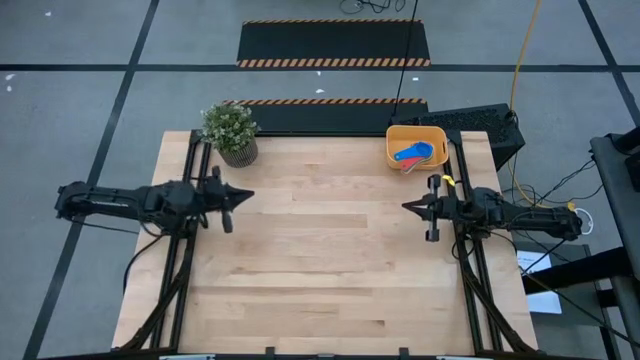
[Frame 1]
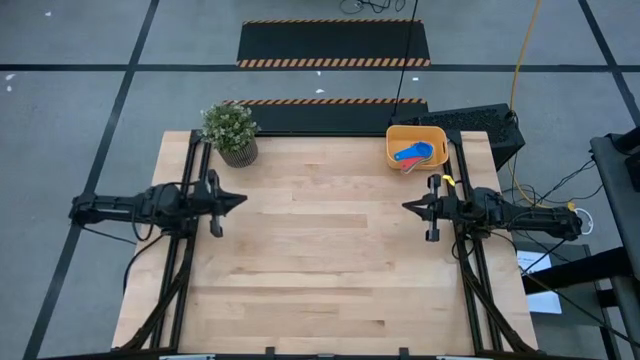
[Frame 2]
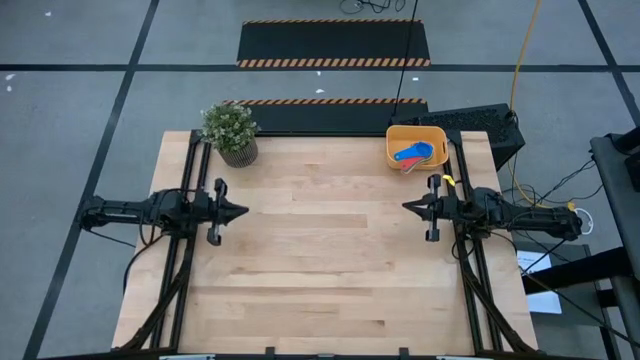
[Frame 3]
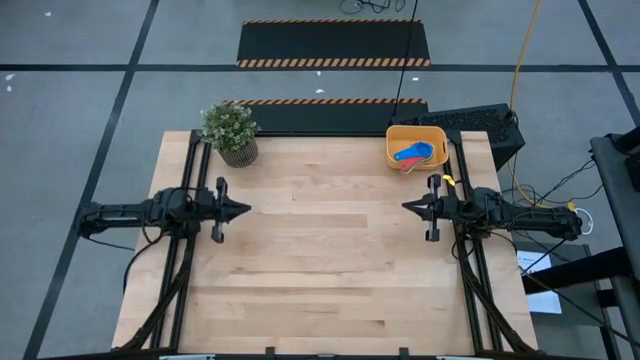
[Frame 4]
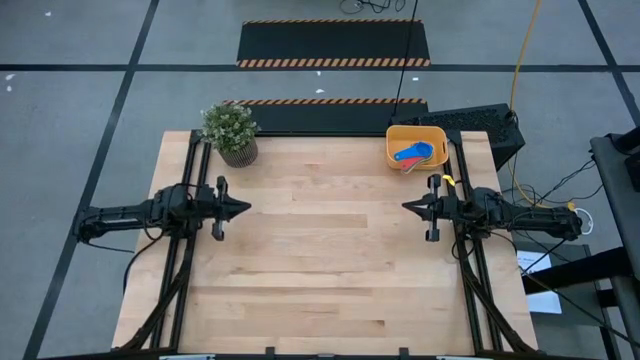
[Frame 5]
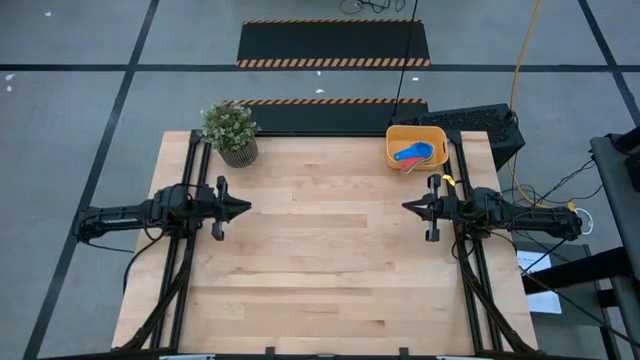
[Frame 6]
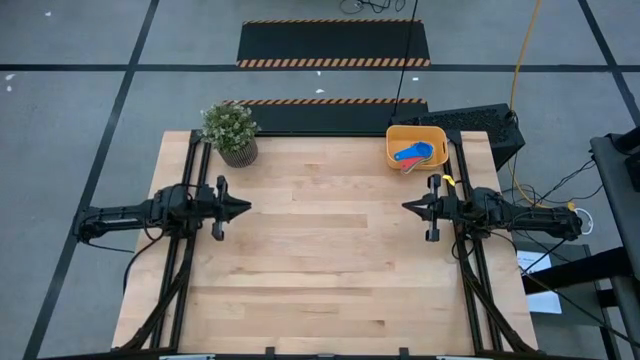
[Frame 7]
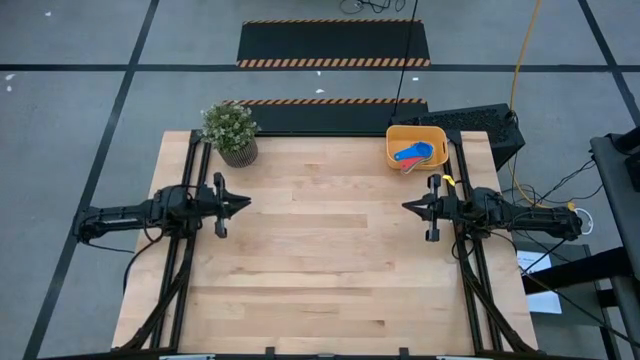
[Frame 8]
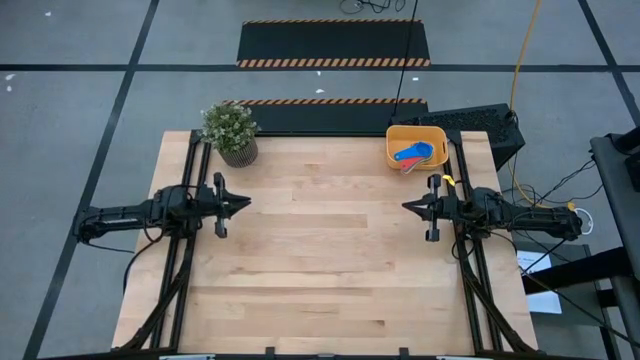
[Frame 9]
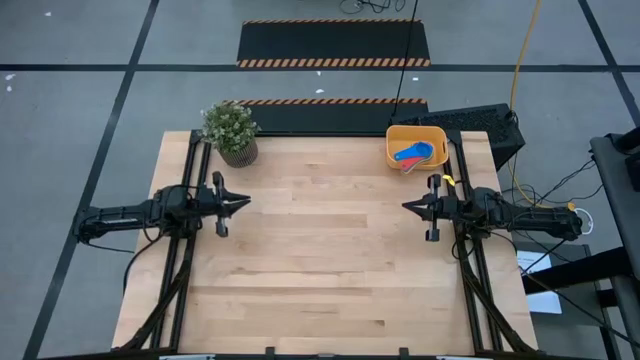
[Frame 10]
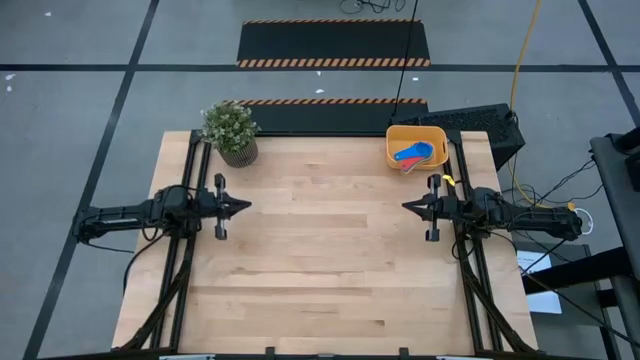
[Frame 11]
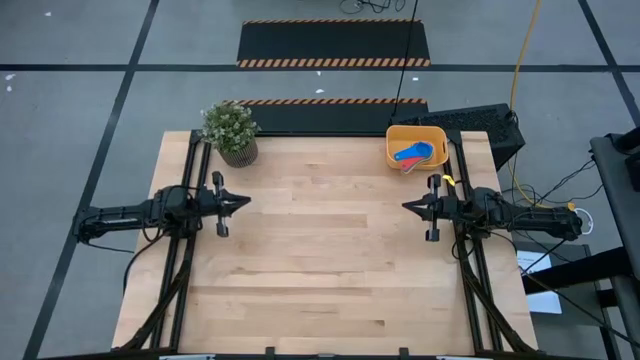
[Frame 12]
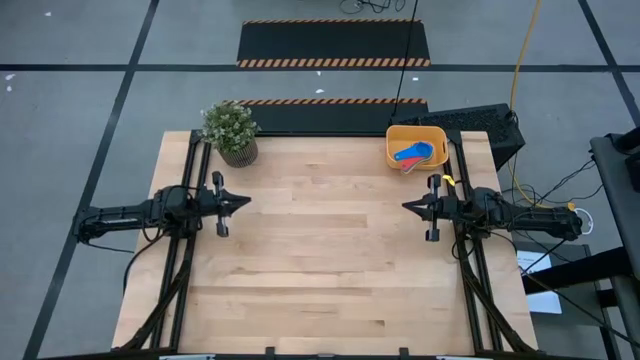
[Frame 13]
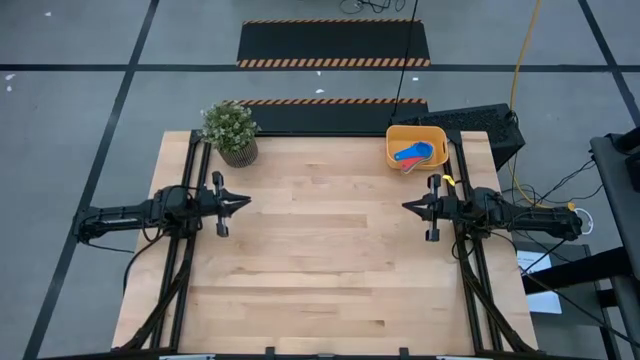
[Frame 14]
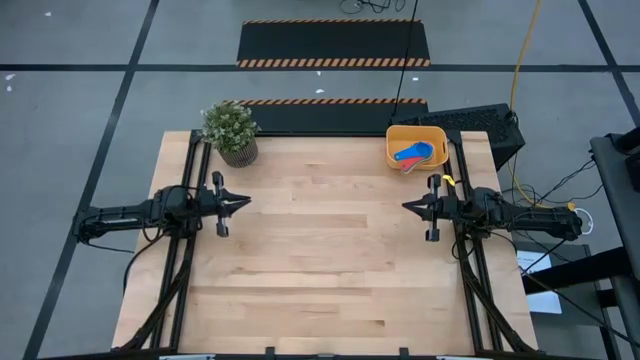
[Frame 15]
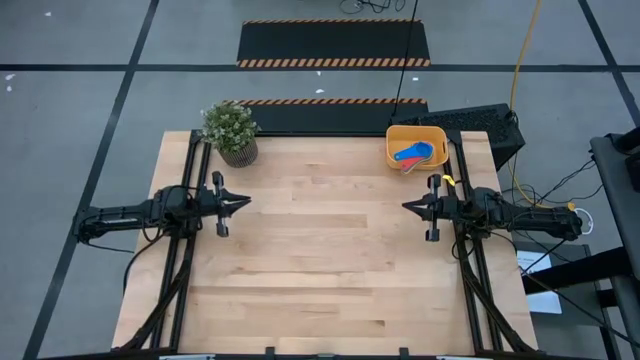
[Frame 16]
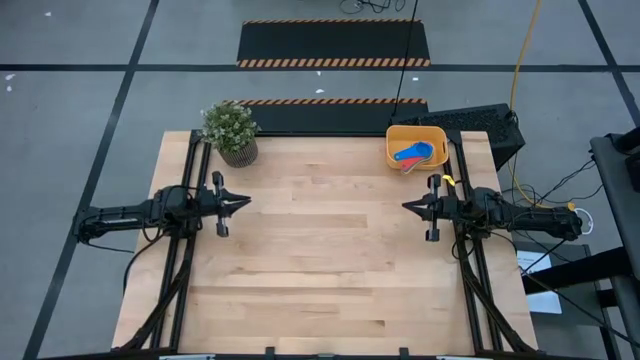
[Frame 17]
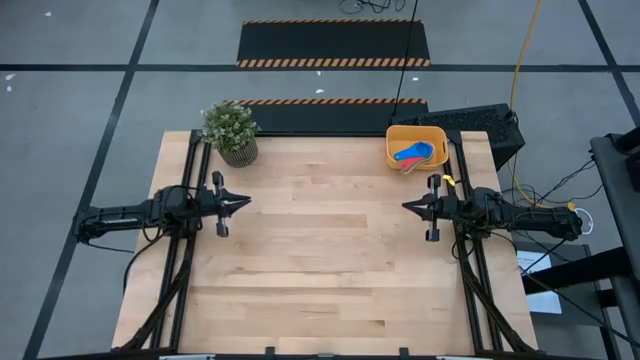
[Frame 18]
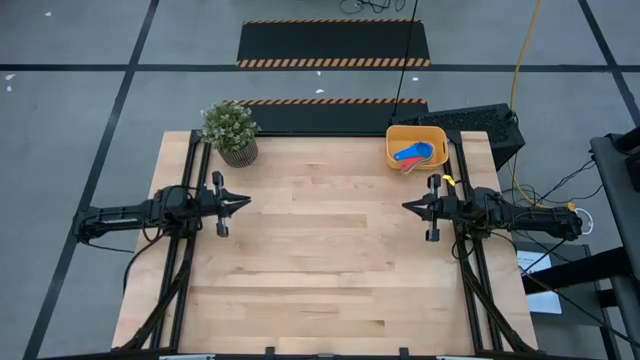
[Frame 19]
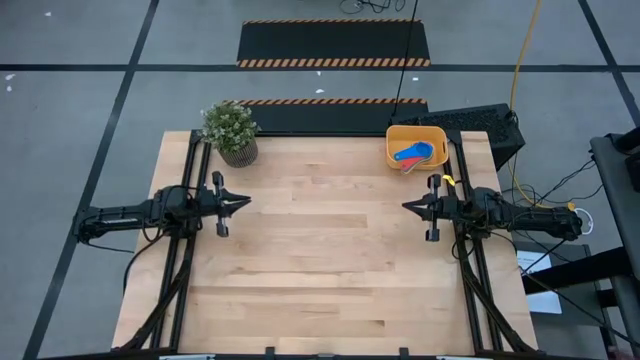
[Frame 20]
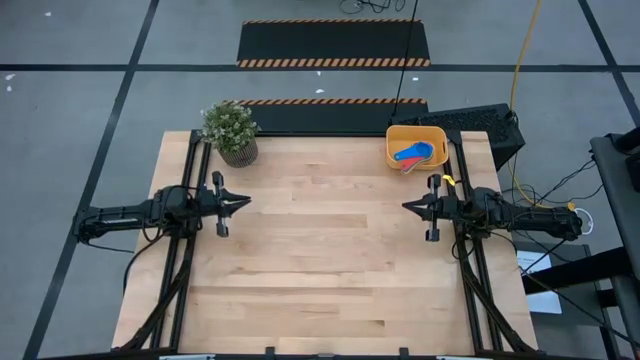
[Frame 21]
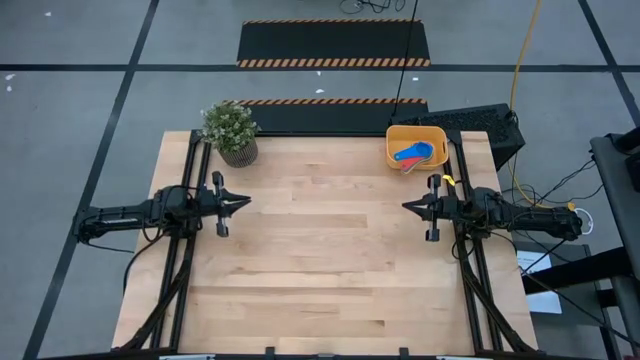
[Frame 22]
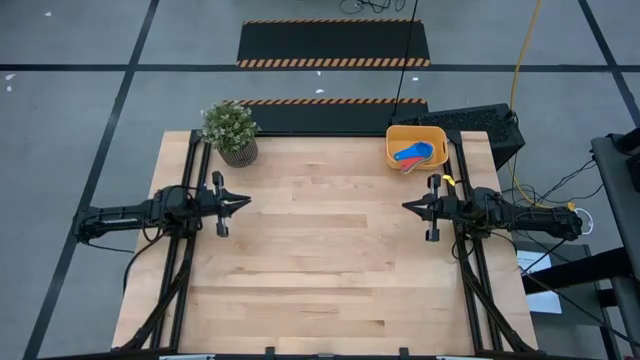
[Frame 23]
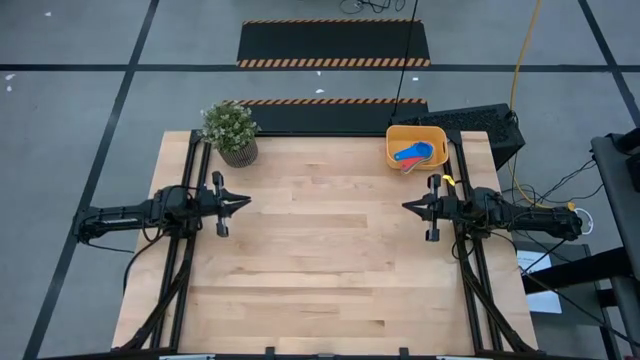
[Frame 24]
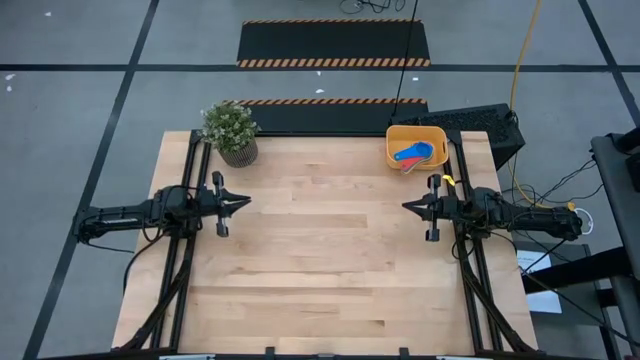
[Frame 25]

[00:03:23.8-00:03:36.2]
Task: Nest measuring cups in basket
Return to Home Position

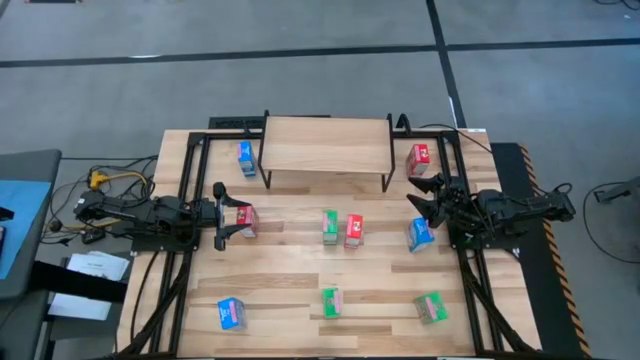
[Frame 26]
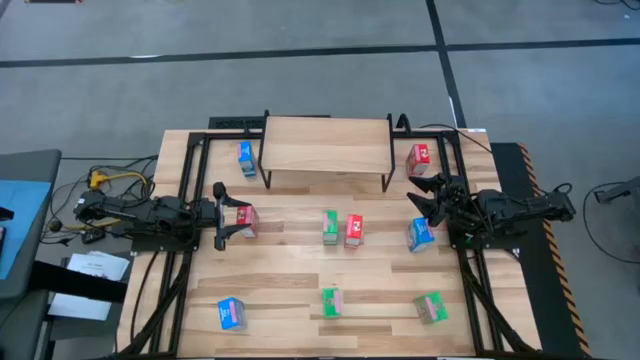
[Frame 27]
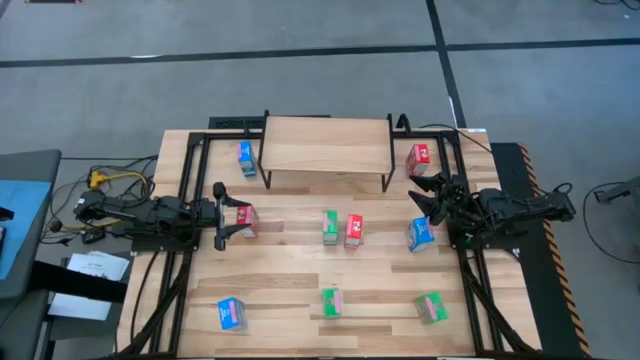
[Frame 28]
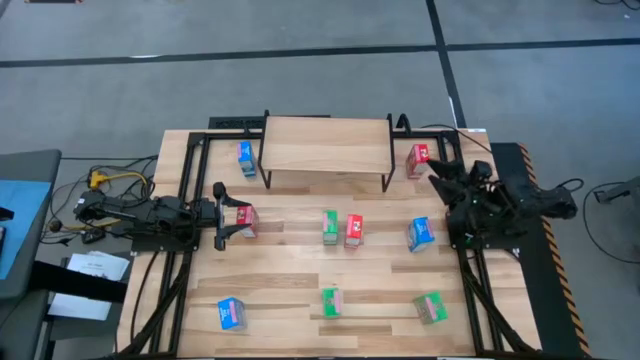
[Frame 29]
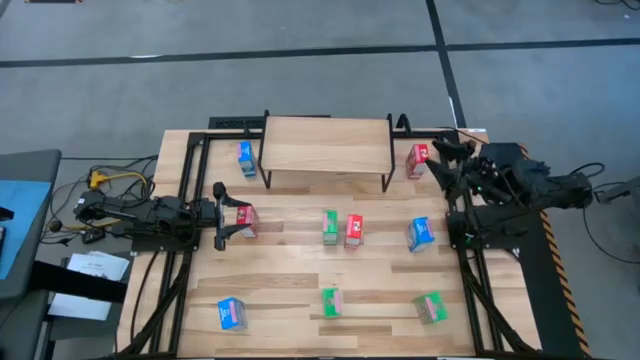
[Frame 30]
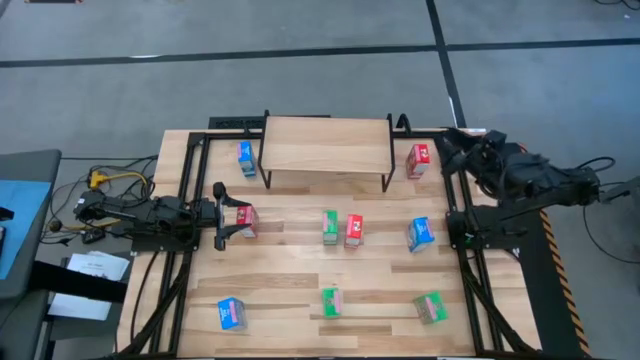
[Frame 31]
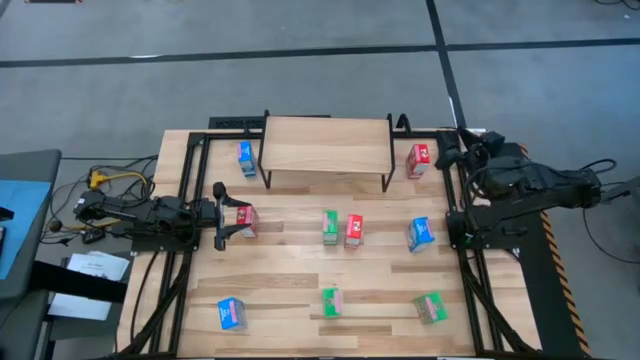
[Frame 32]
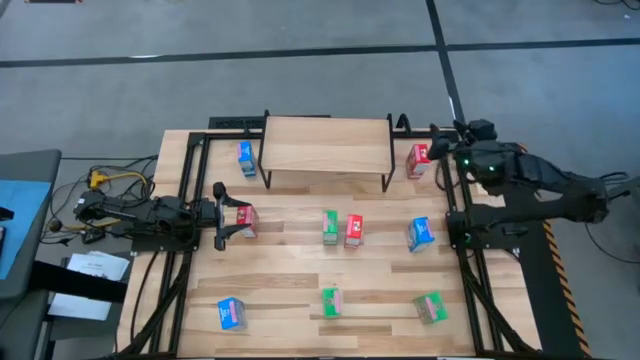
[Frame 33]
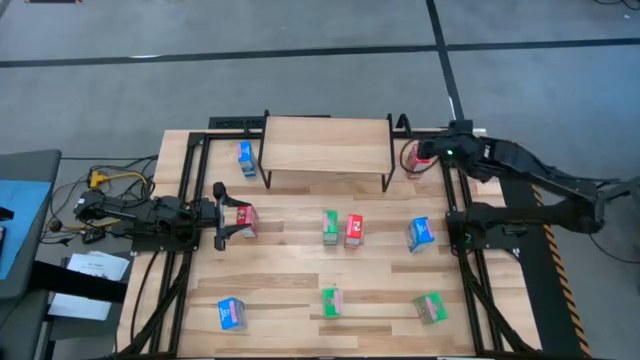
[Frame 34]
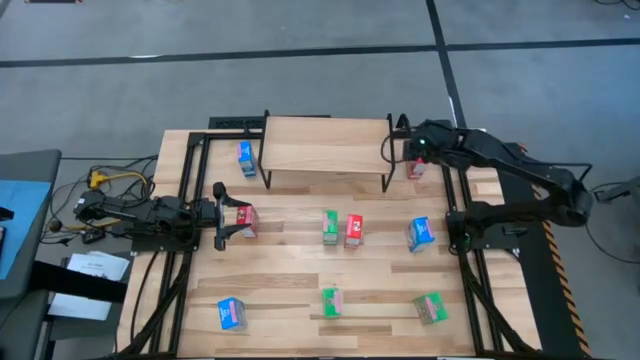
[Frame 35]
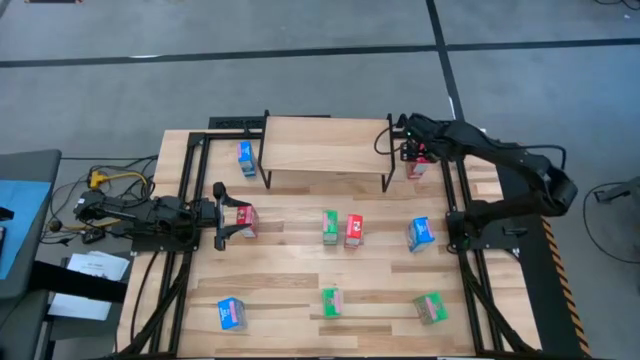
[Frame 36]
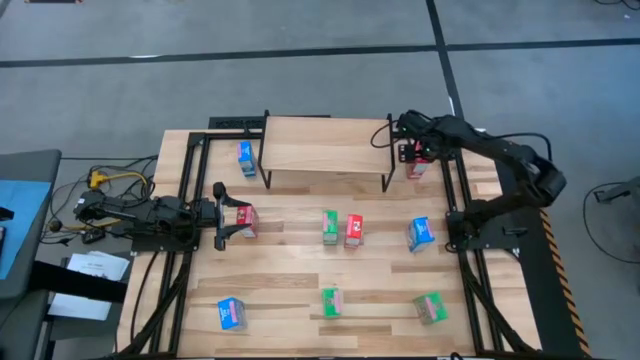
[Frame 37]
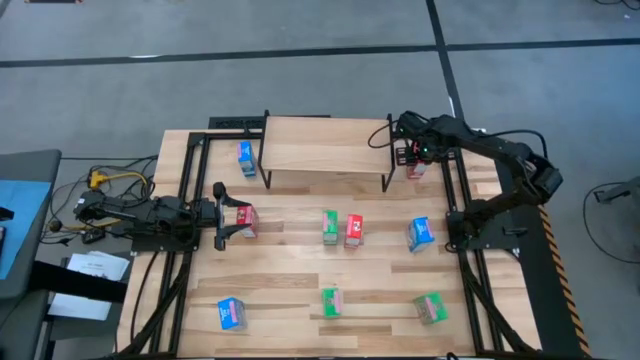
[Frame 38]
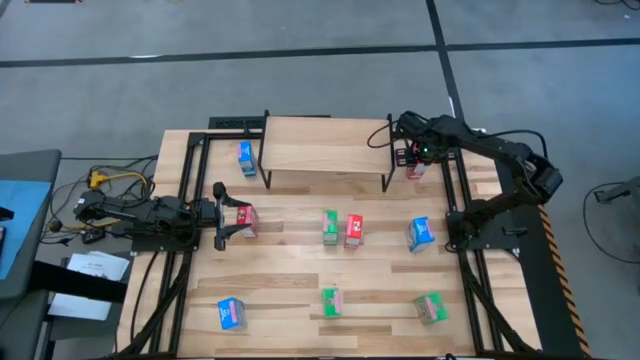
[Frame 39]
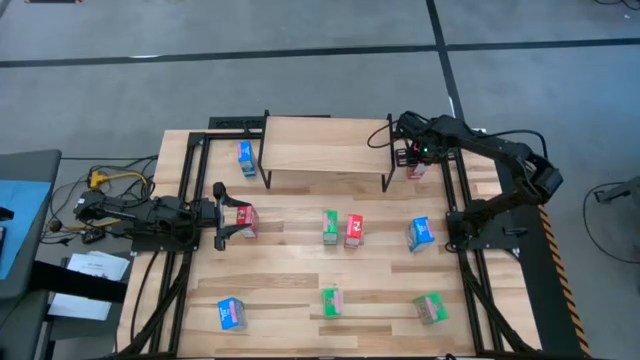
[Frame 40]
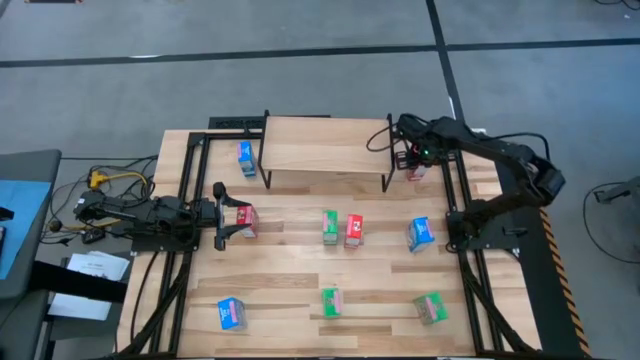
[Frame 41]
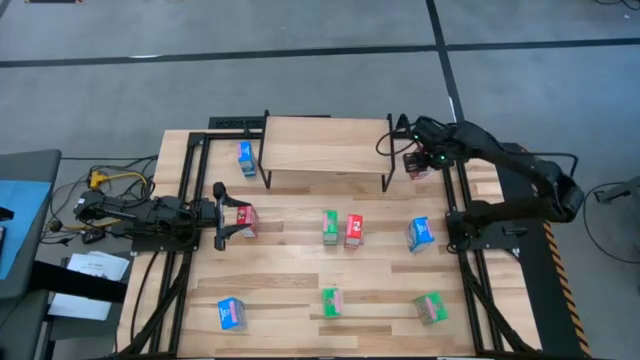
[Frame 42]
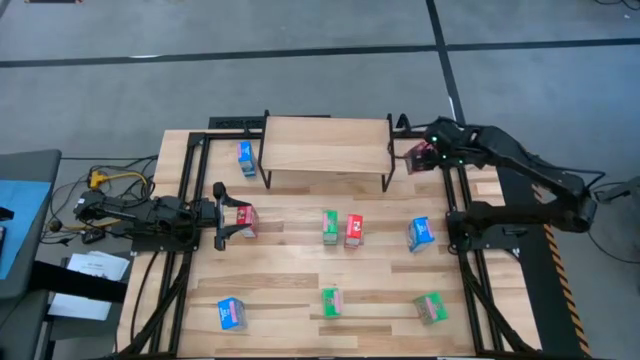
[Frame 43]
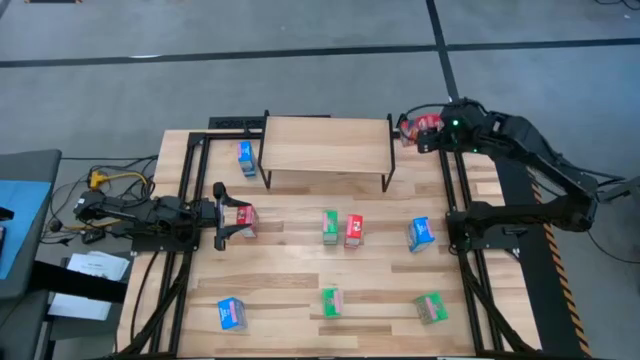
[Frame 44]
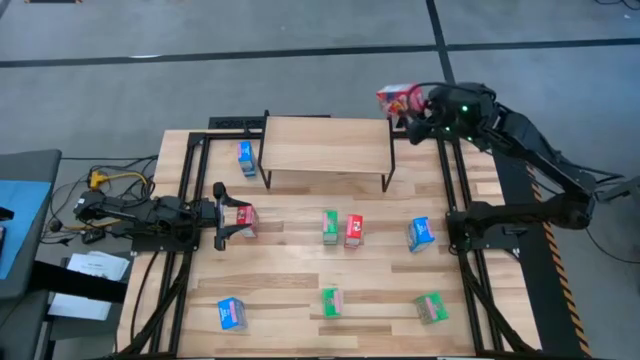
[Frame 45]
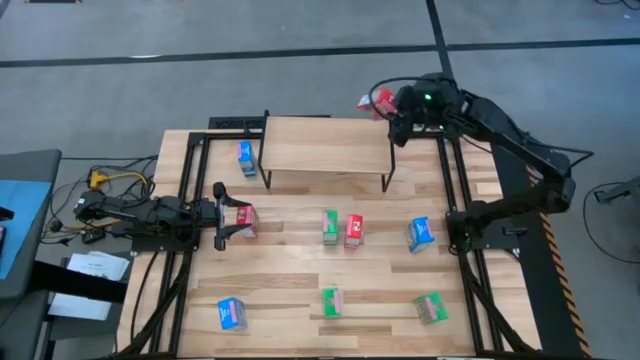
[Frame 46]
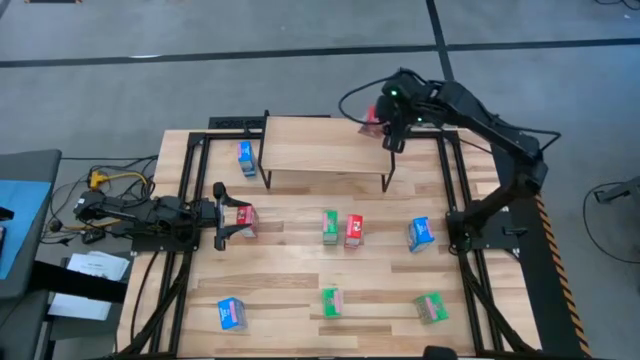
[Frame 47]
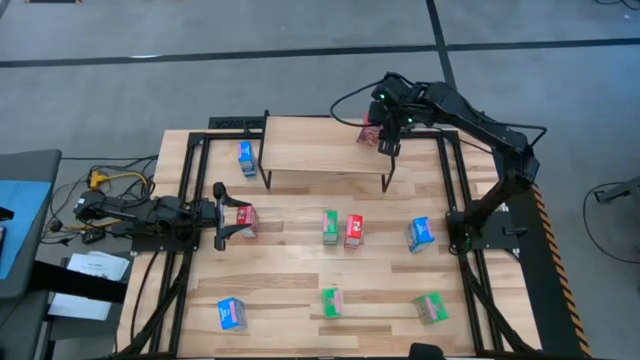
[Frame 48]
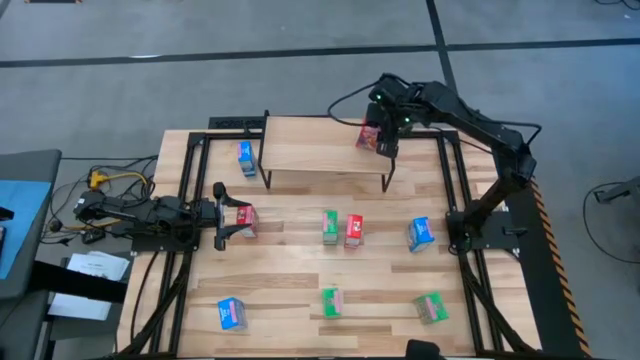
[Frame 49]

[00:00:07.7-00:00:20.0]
Task: Stack cereal on shelf
Put the top red cereal box on the shelf
